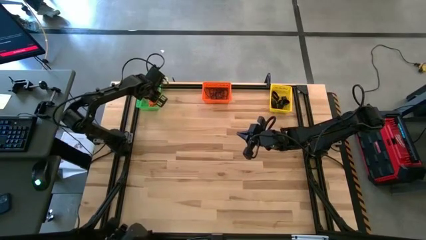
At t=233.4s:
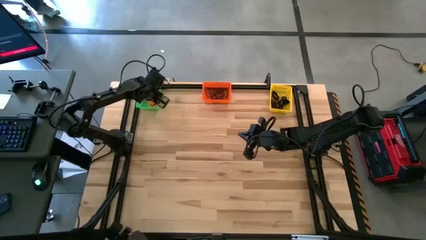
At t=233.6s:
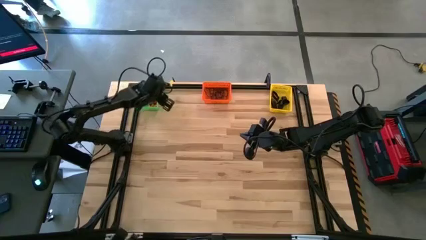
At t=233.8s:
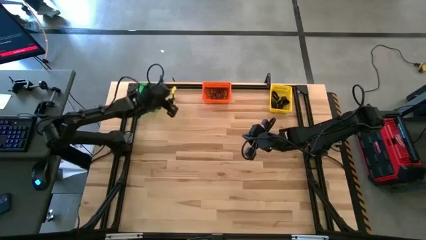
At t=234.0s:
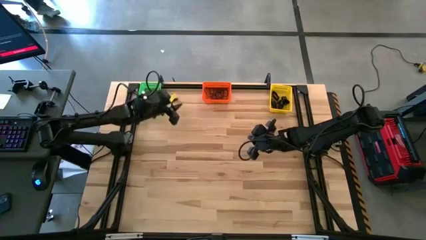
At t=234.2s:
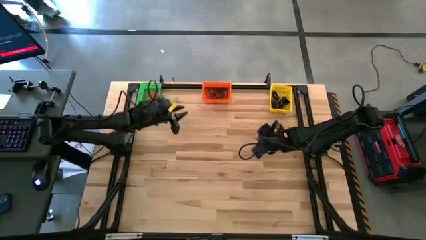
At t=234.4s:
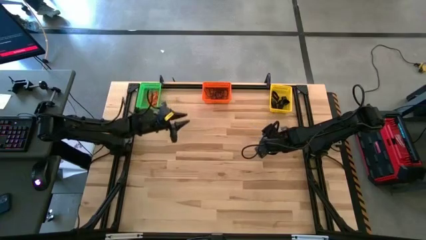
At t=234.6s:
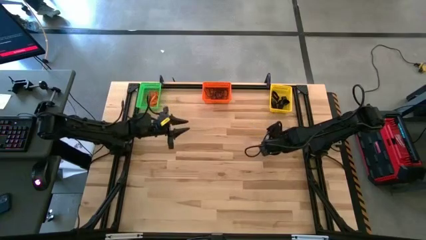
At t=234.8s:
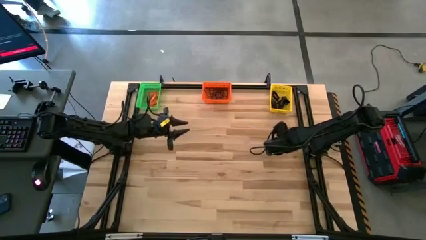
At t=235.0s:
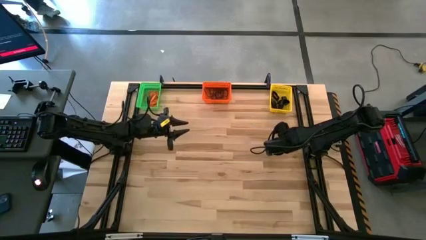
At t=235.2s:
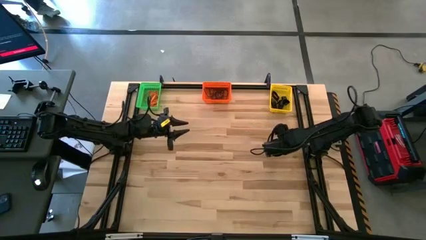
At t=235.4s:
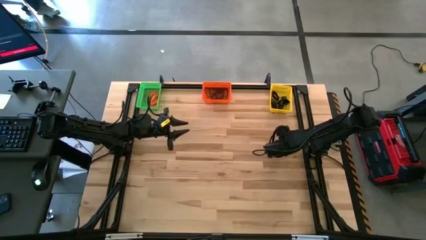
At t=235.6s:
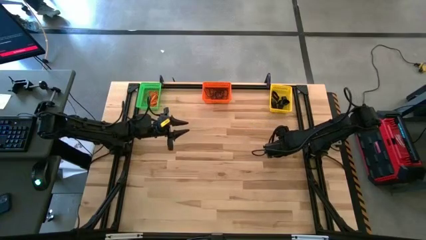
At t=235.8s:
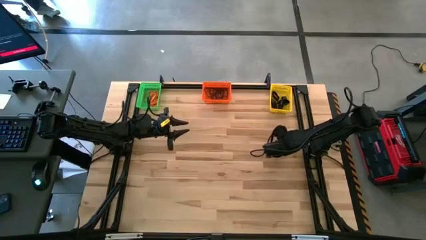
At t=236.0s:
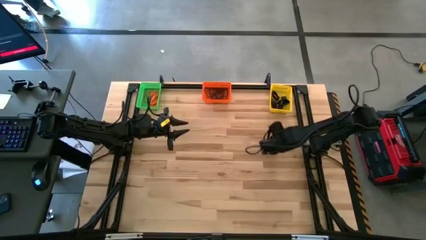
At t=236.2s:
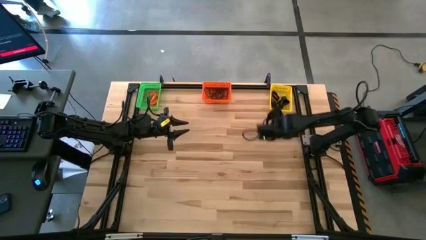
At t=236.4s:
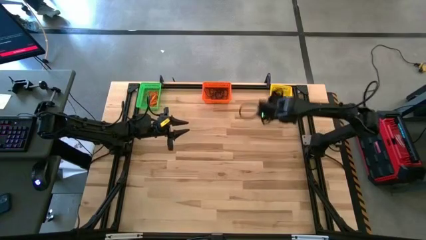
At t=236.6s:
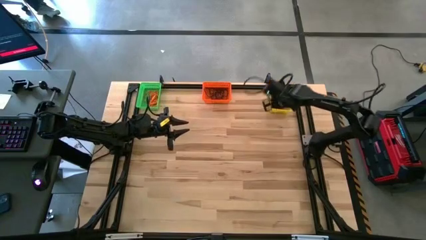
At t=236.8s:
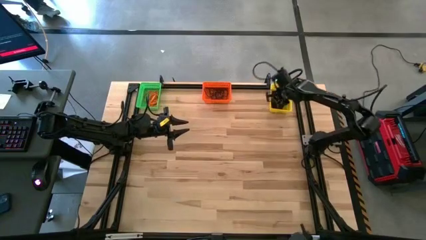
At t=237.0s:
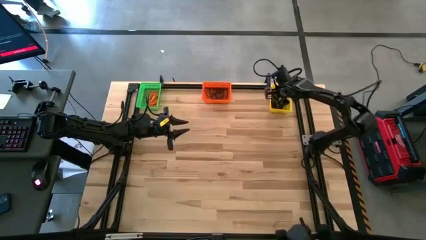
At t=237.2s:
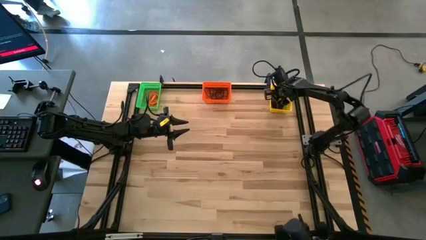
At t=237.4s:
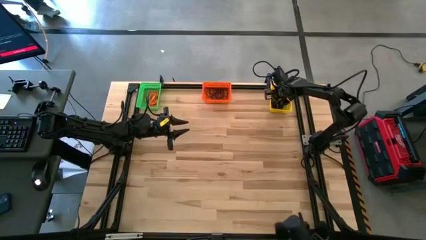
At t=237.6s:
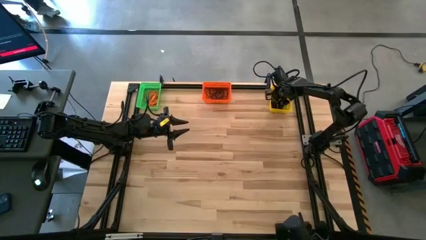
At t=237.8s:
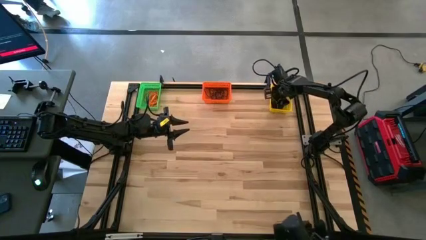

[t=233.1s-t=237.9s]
Task: Sort rubber bands into baskets
Put the black rubber band into the yellow bin

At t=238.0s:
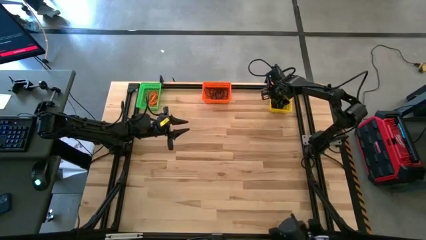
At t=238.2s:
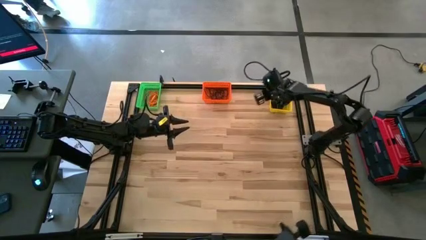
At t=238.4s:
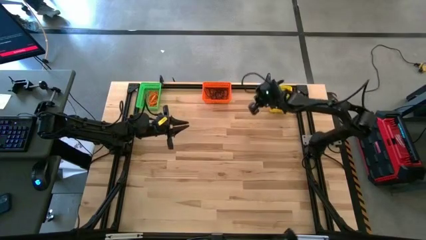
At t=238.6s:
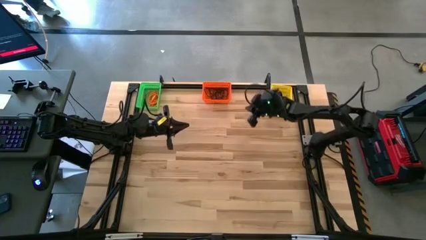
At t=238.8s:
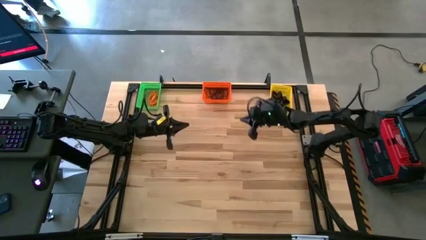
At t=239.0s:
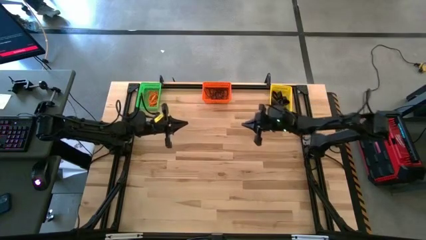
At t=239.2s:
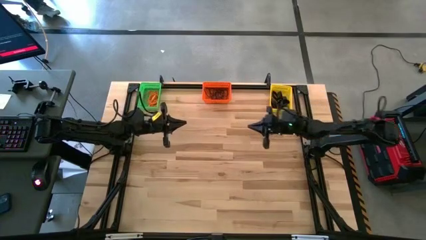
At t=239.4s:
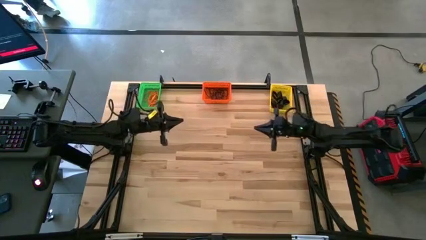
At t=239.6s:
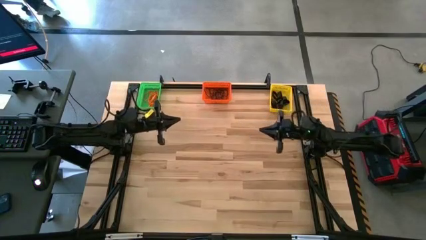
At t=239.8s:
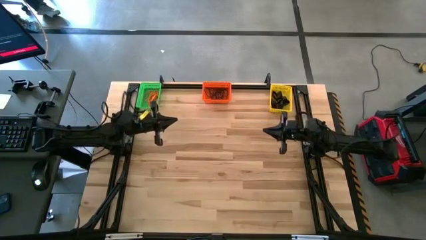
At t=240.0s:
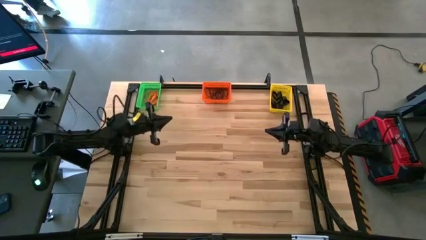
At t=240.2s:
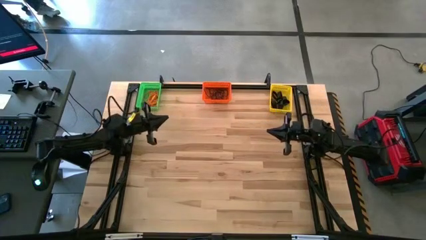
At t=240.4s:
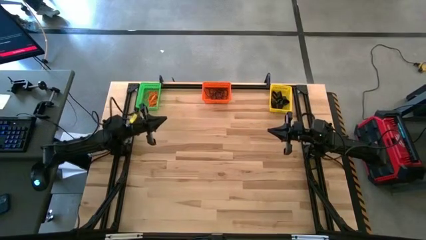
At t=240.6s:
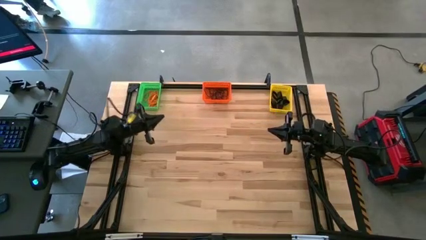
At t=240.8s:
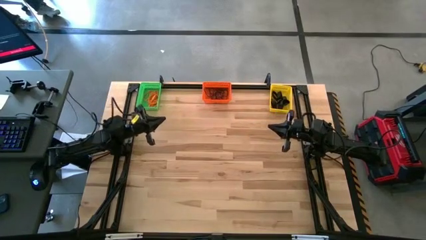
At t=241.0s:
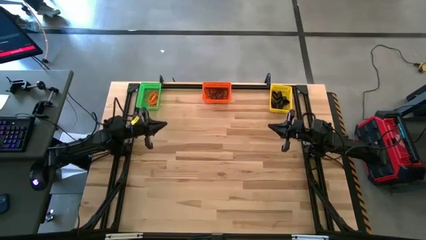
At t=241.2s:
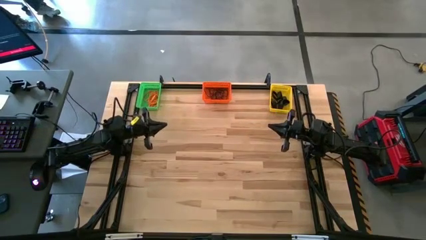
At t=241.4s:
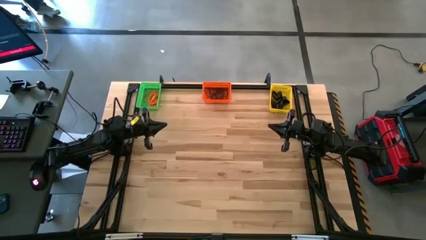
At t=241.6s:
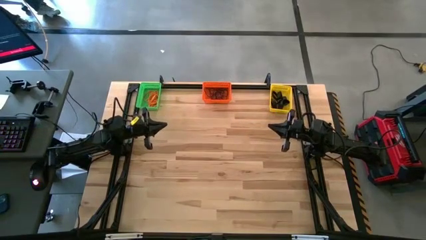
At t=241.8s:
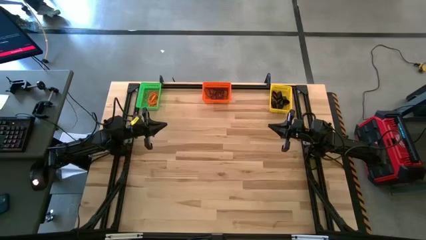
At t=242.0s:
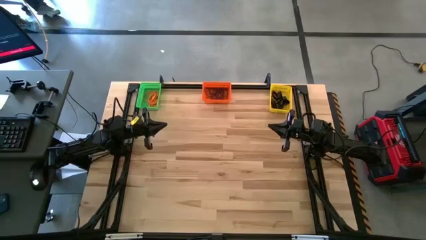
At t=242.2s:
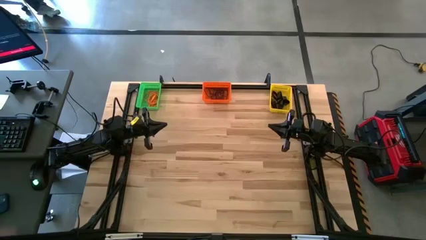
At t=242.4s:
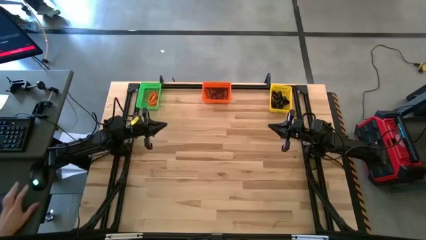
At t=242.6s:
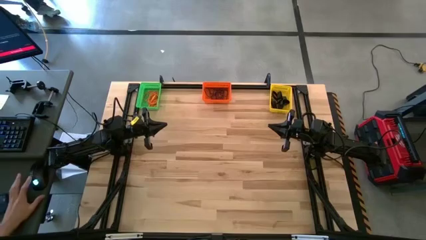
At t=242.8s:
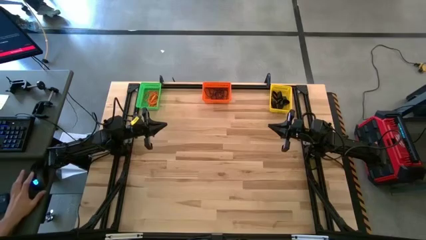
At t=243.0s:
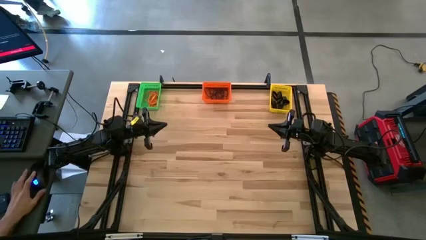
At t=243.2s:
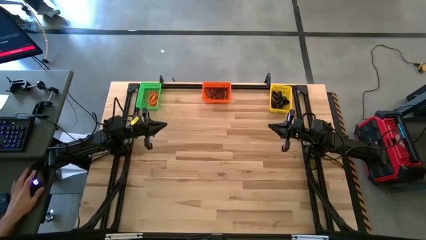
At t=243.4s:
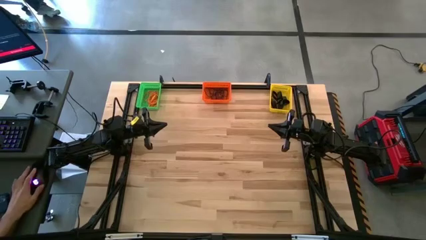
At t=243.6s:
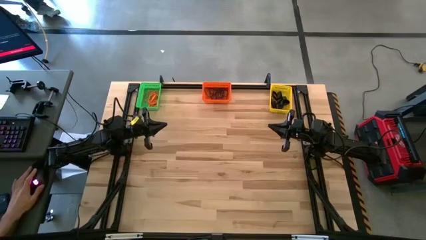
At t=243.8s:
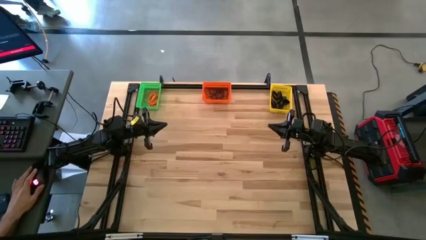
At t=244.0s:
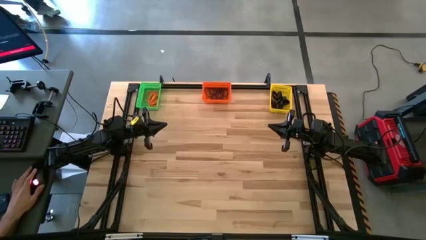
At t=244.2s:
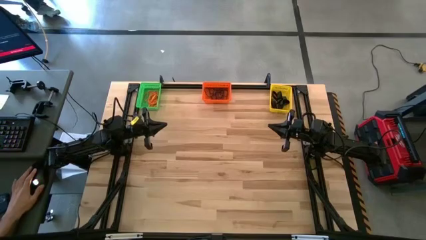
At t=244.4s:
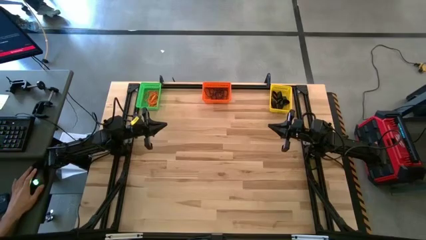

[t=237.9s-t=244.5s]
Return to Home Position

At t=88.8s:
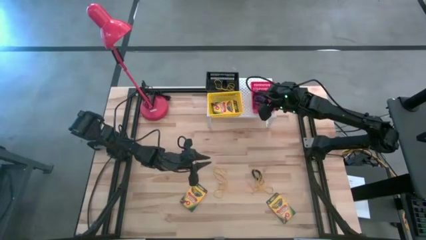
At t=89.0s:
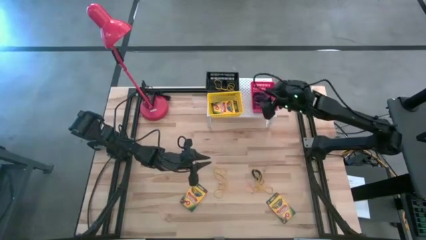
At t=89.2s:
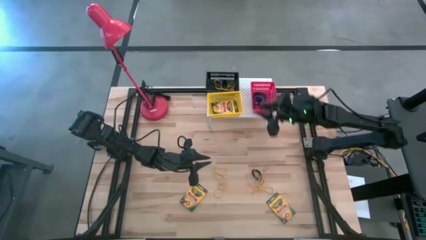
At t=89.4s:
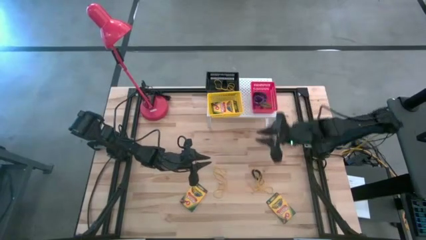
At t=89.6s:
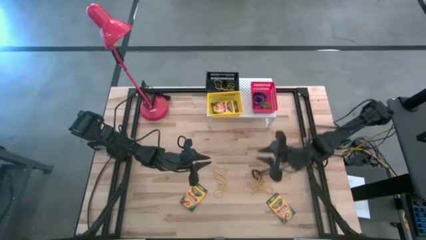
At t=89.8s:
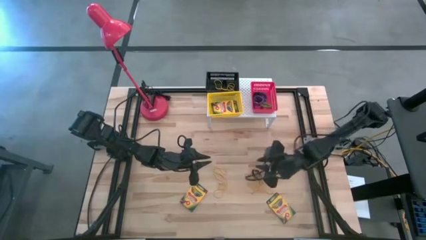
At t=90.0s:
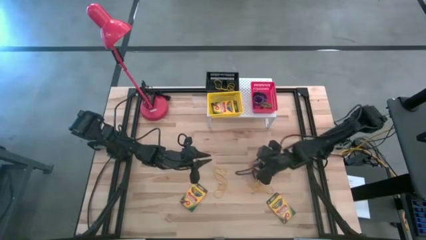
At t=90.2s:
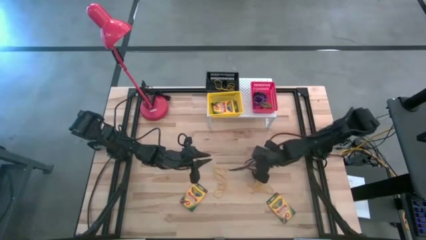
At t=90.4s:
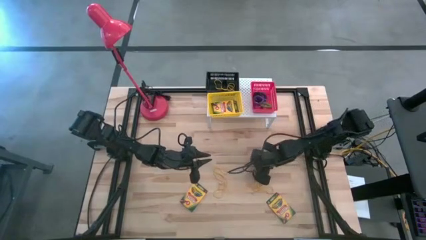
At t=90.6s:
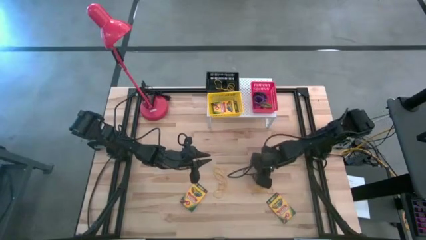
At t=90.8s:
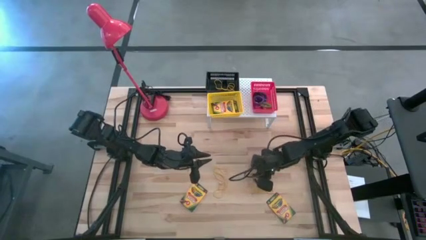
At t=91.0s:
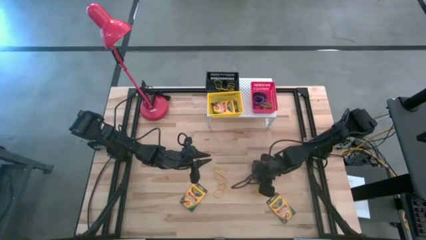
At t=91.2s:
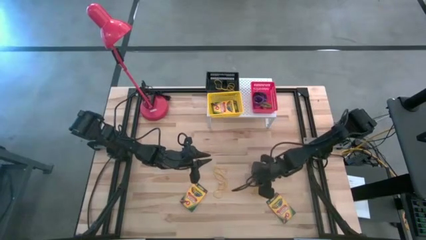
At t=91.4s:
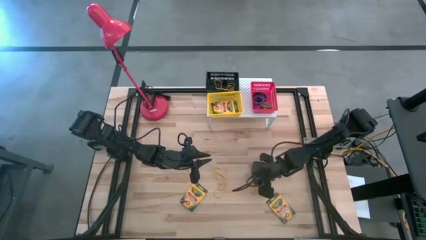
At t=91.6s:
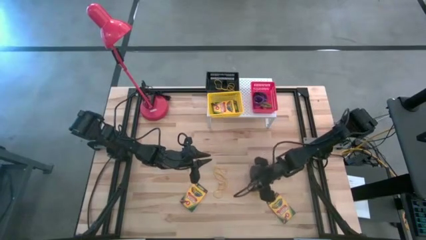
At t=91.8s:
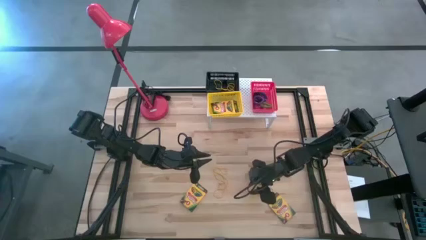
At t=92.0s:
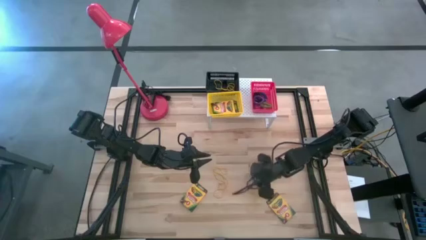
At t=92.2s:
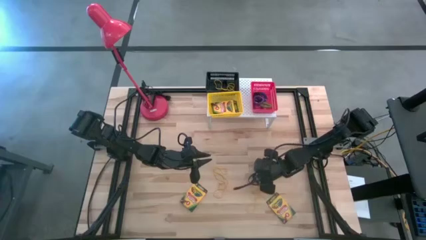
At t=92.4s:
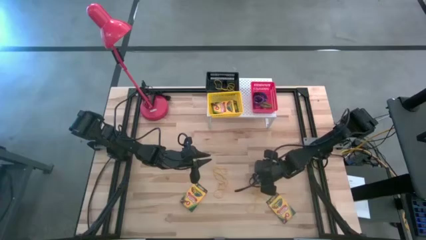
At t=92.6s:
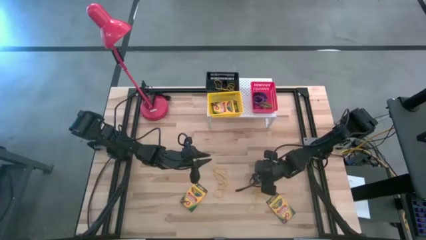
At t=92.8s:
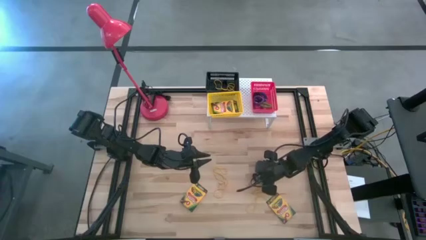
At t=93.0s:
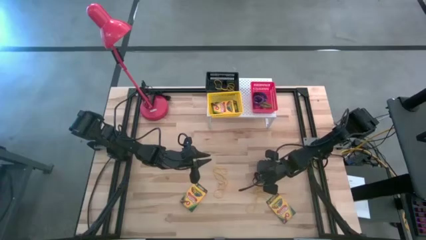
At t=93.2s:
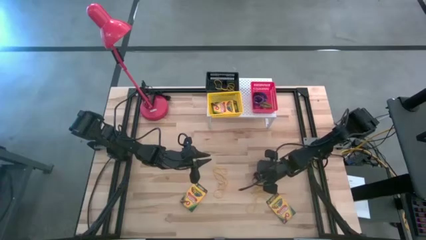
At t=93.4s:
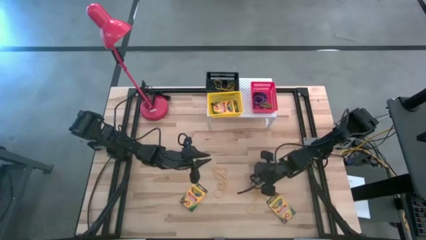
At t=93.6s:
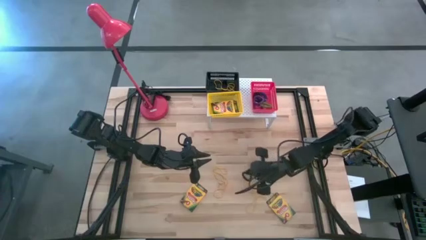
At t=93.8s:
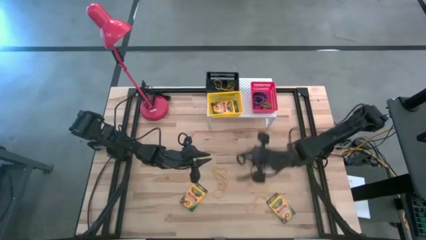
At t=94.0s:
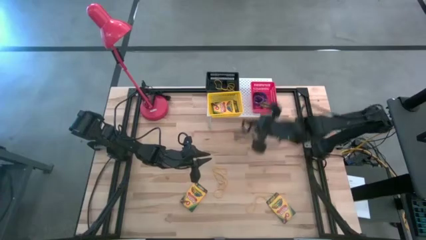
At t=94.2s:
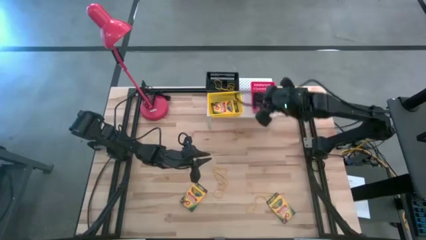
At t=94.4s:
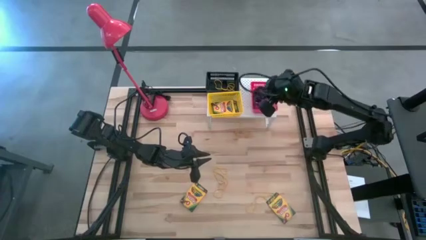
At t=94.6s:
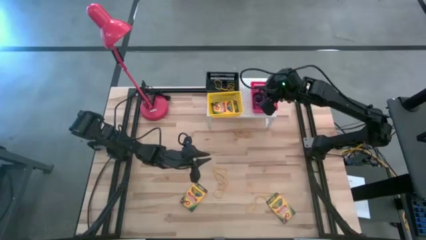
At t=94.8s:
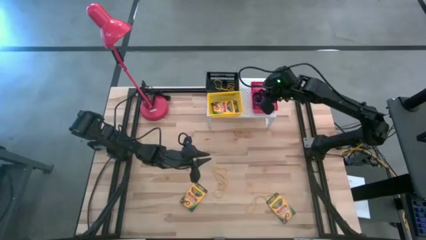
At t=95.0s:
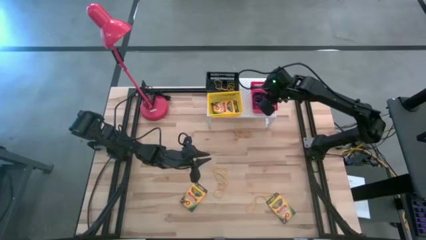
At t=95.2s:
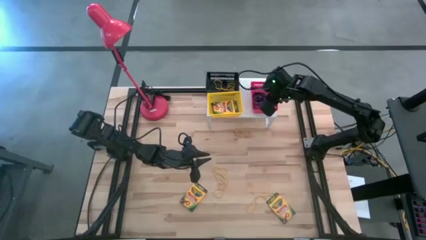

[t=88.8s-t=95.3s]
Task: Pick & Place Office Desk Supplies
Put the black spring keychain into the red bin on the shelf
